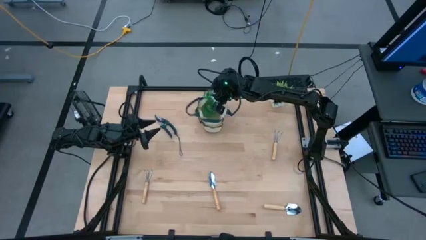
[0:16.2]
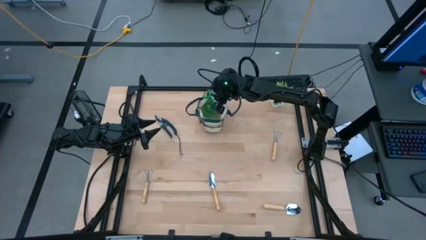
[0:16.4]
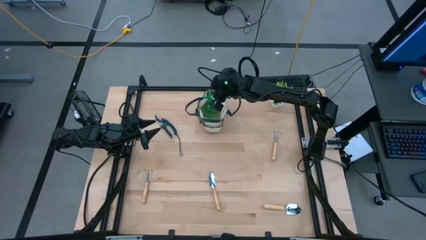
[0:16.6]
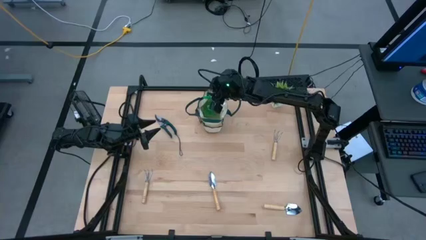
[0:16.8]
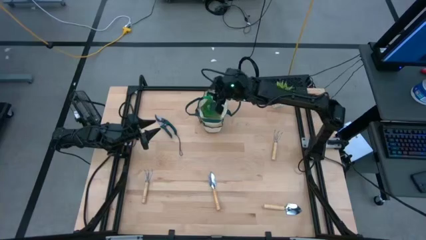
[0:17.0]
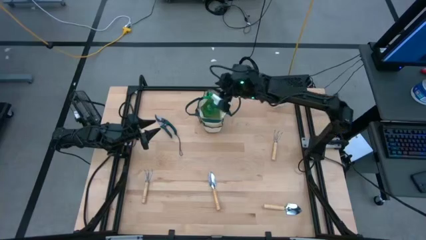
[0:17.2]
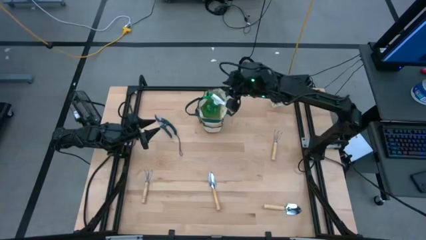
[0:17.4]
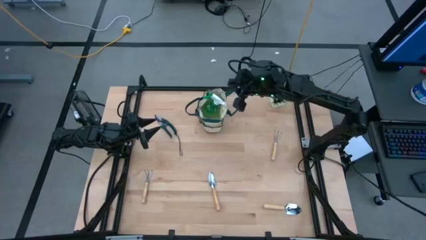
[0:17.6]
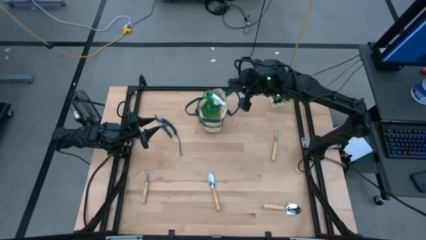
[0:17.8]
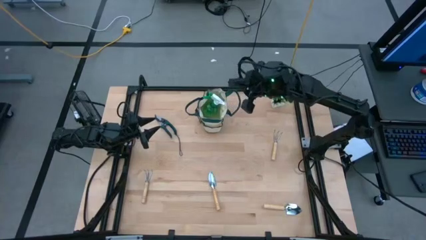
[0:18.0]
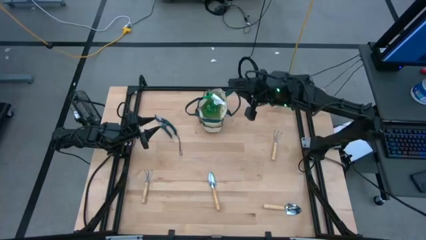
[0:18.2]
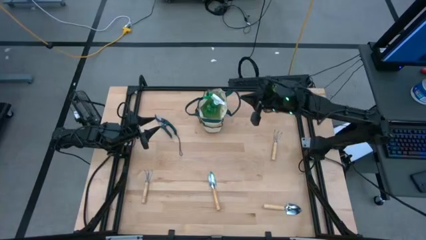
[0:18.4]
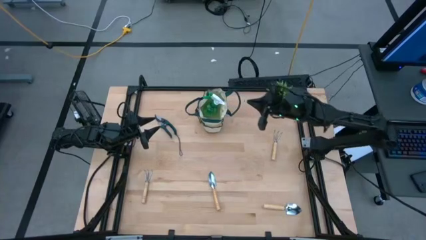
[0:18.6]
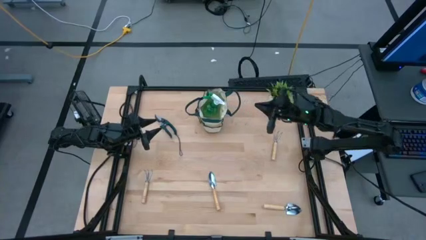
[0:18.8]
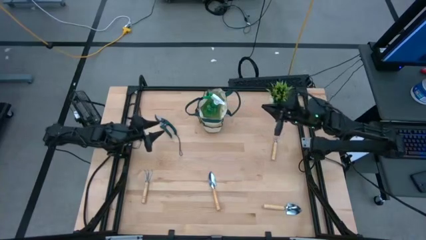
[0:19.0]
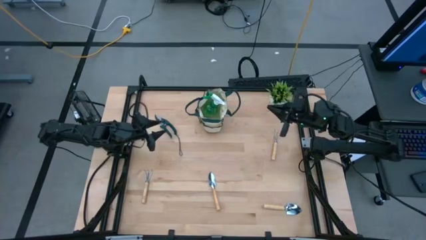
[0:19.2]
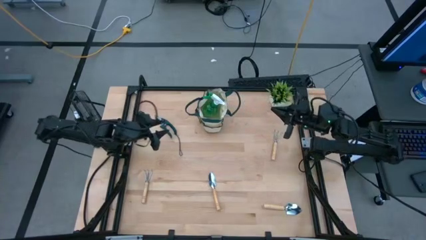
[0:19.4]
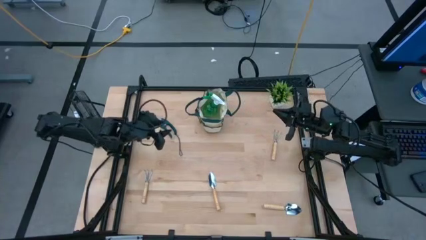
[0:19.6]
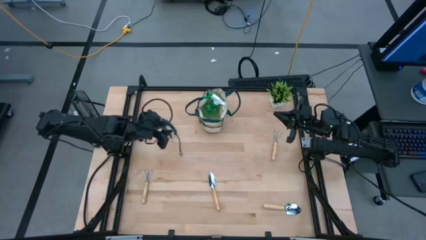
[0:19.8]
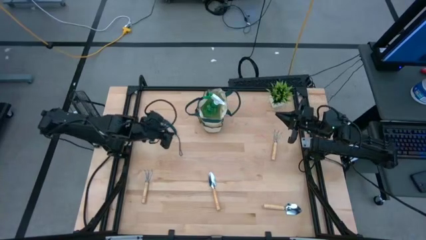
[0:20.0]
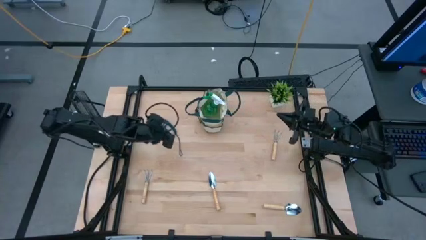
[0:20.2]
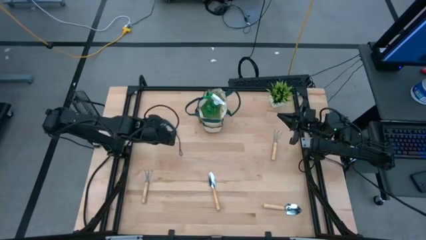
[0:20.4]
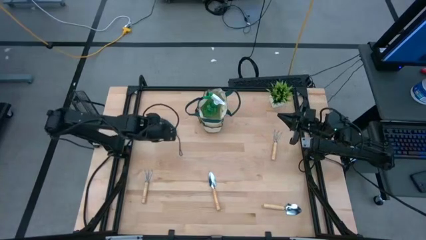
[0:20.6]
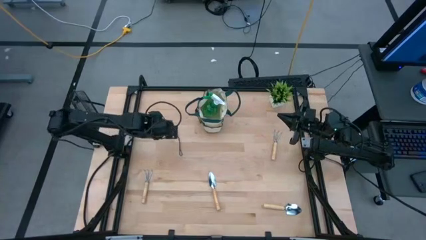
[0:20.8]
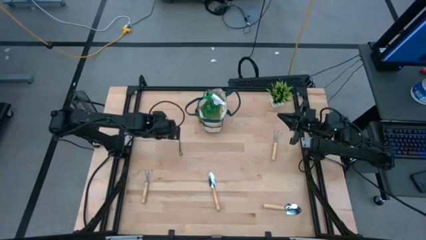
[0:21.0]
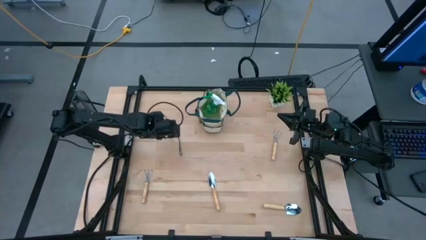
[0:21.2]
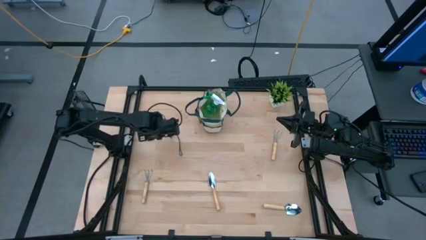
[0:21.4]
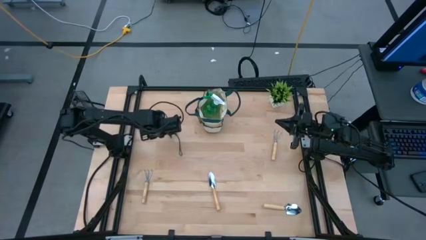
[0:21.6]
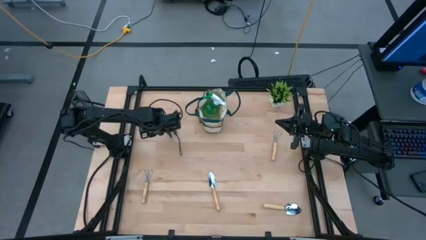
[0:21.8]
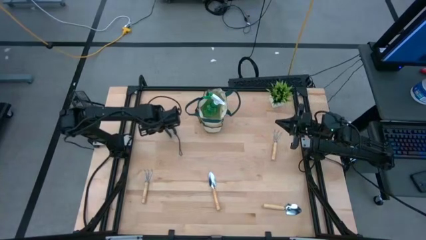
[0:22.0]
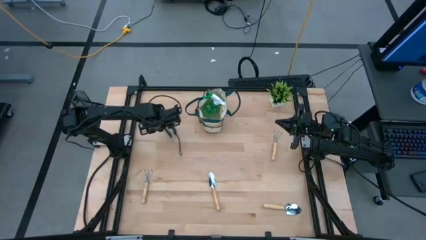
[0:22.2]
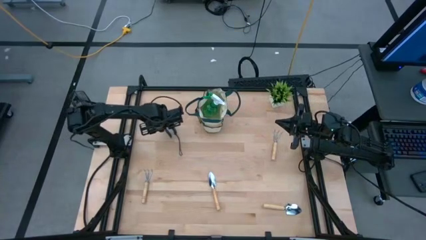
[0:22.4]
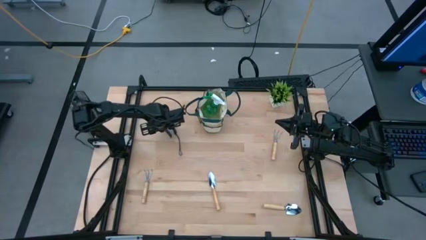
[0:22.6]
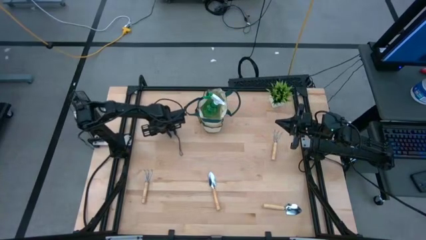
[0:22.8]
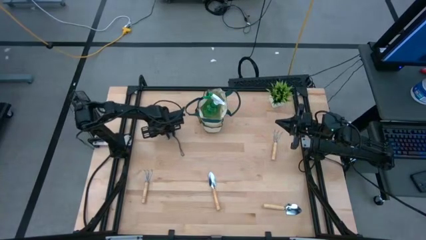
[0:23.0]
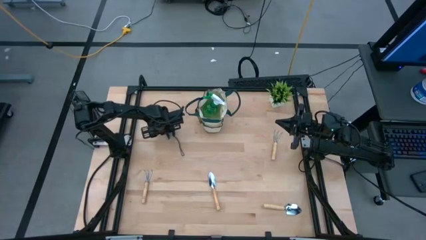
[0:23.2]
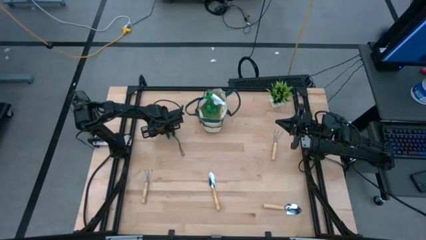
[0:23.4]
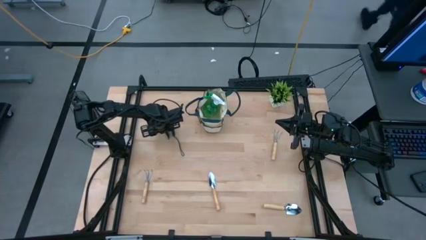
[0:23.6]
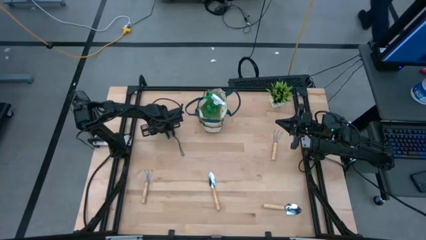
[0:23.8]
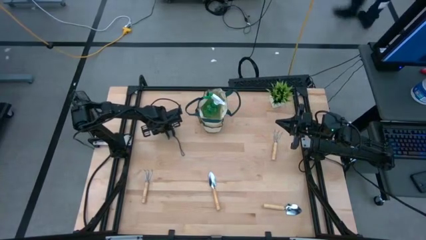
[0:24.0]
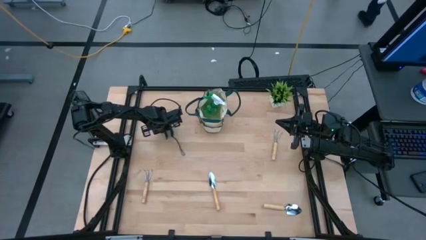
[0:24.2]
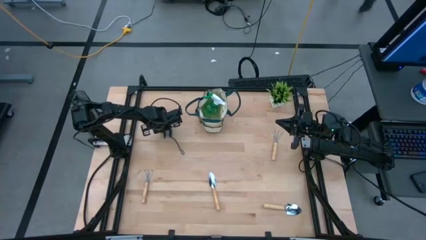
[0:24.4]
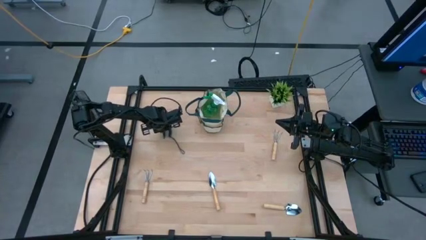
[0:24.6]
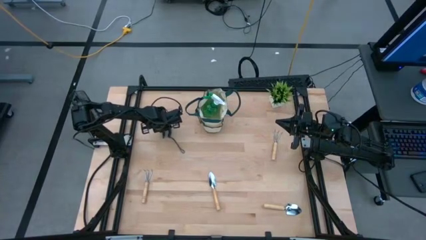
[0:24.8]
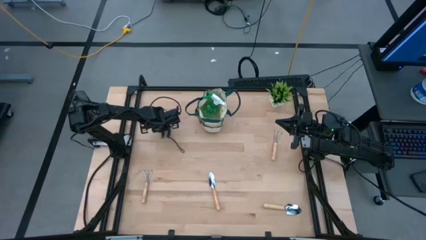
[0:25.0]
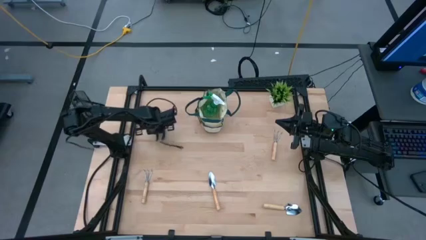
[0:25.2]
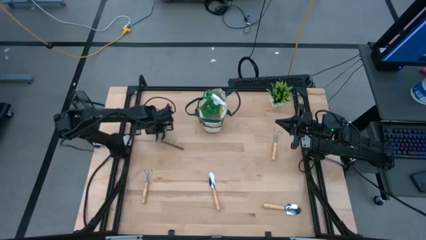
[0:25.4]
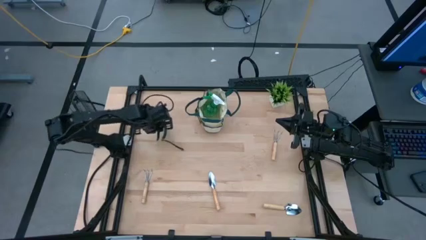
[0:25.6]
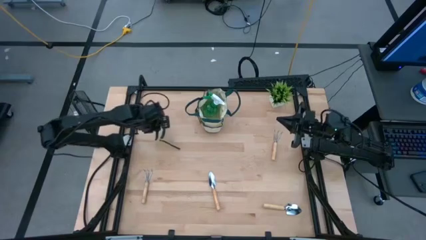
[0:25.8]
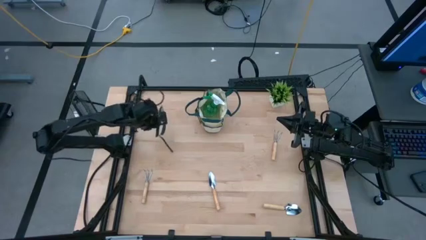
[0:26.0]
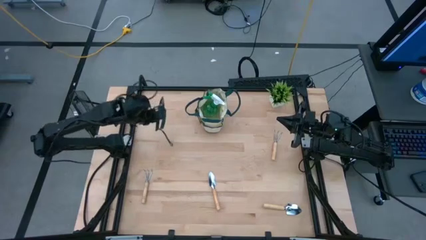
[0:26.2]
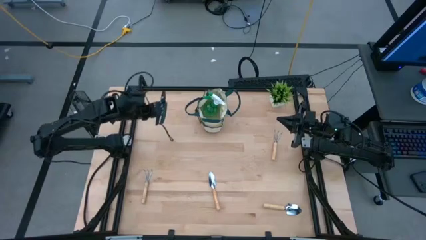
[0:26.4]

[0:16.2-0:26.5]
Task: Pick & Place Garden tools in Gardening bag
Put the green shear scissors into the gardening bag

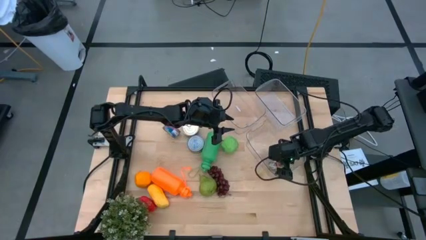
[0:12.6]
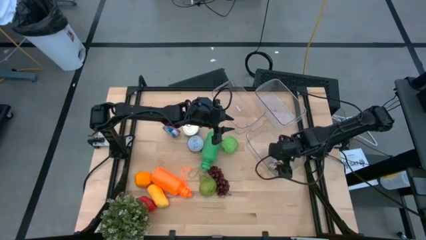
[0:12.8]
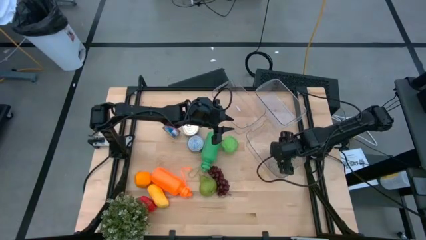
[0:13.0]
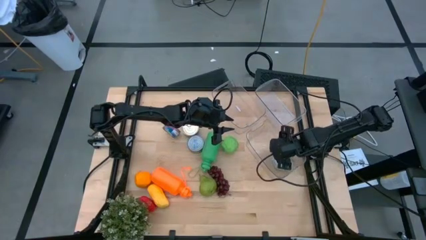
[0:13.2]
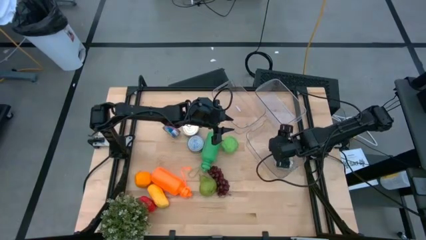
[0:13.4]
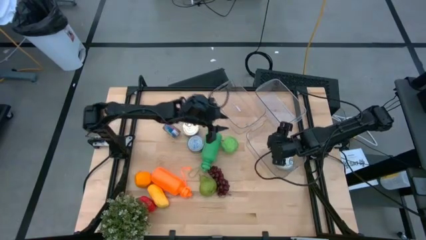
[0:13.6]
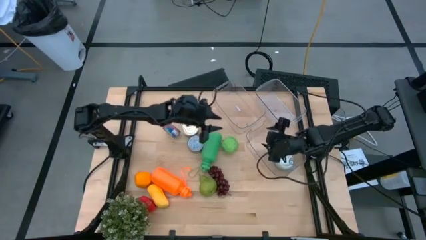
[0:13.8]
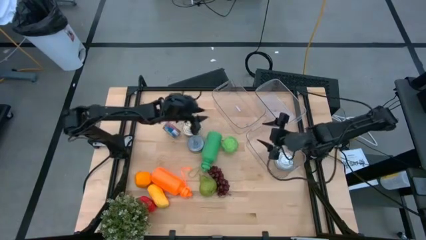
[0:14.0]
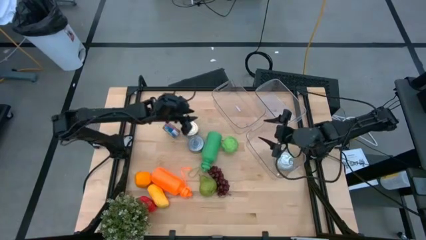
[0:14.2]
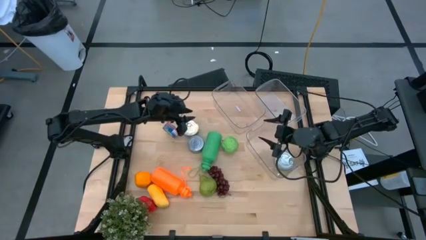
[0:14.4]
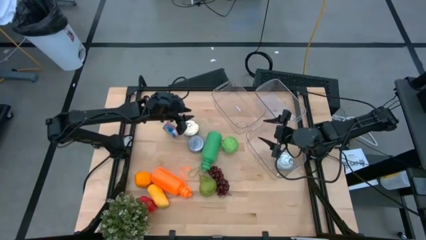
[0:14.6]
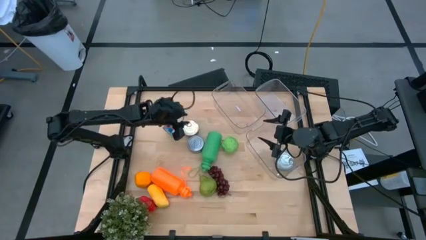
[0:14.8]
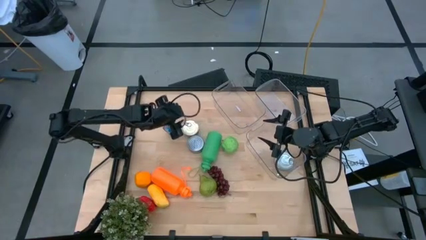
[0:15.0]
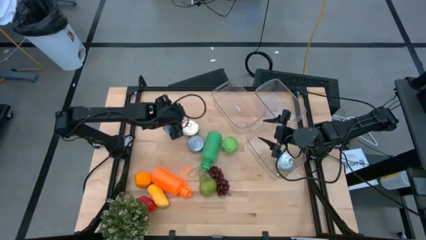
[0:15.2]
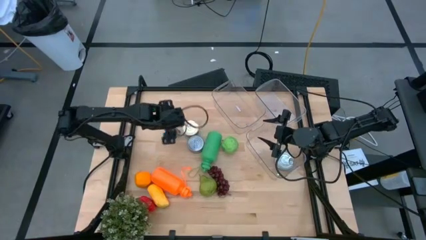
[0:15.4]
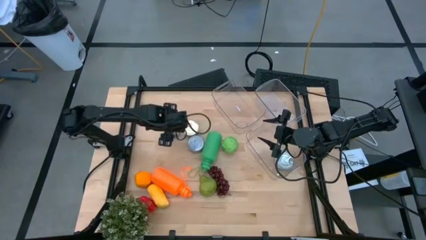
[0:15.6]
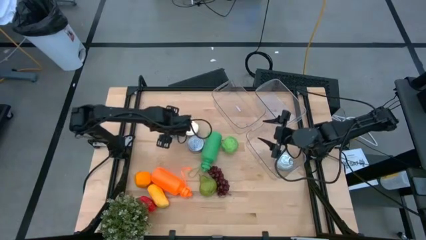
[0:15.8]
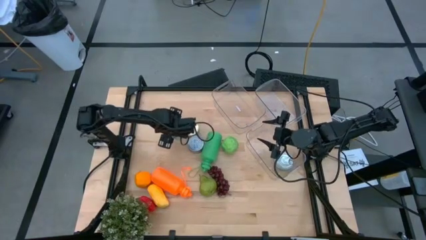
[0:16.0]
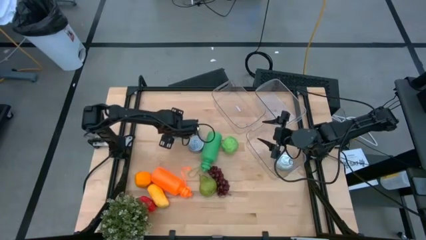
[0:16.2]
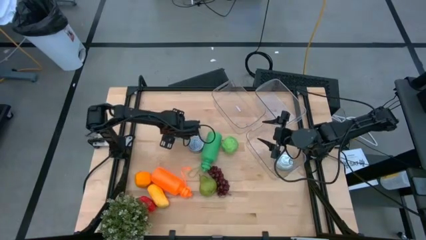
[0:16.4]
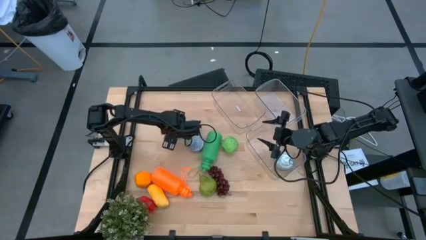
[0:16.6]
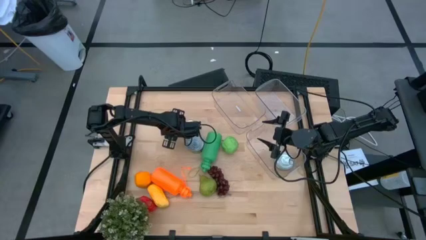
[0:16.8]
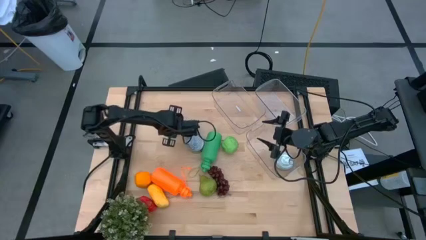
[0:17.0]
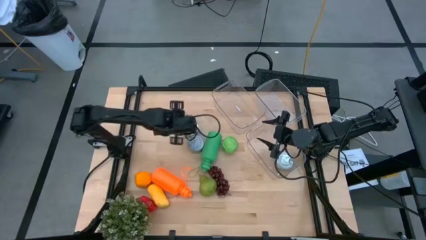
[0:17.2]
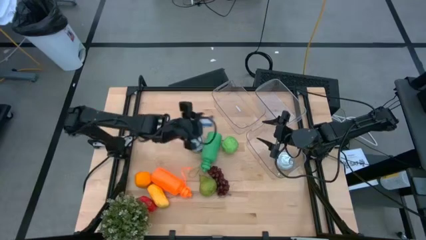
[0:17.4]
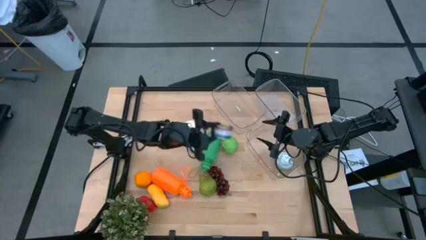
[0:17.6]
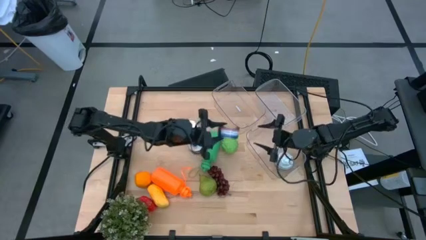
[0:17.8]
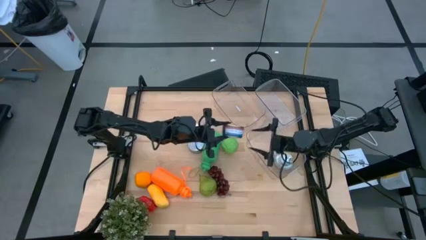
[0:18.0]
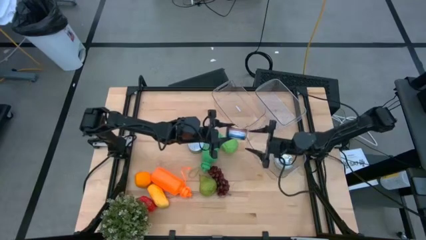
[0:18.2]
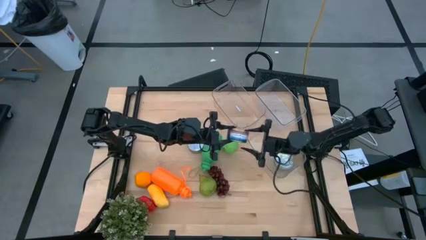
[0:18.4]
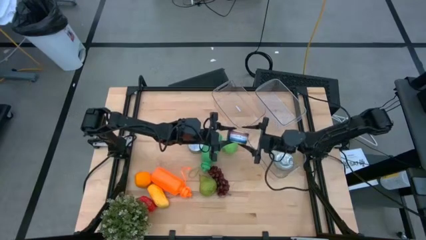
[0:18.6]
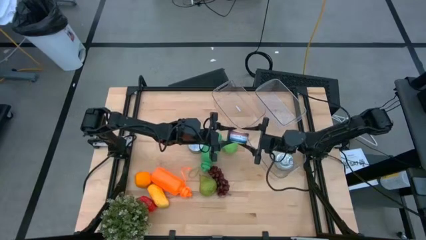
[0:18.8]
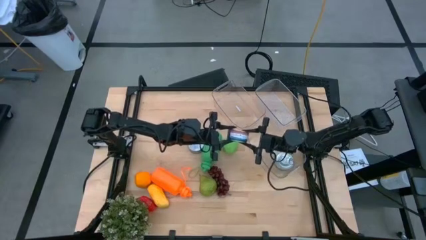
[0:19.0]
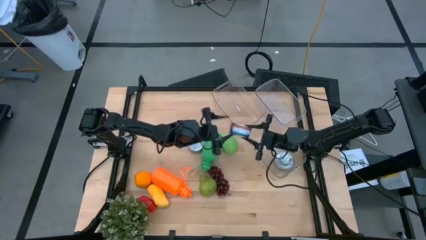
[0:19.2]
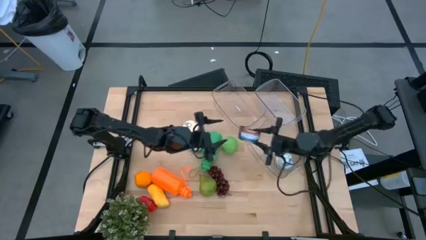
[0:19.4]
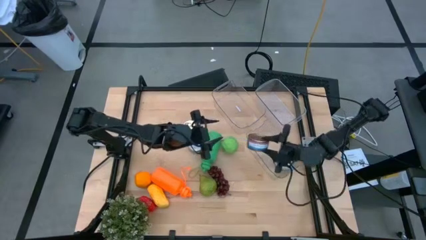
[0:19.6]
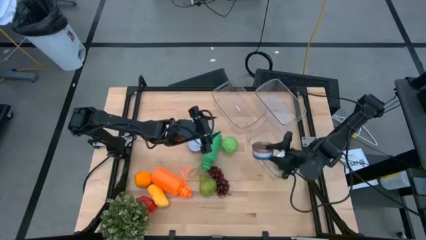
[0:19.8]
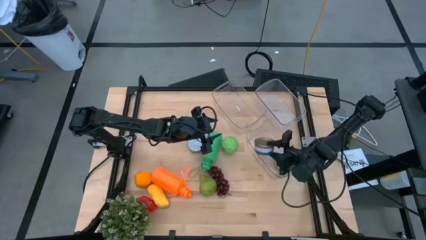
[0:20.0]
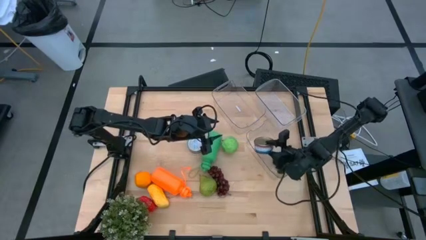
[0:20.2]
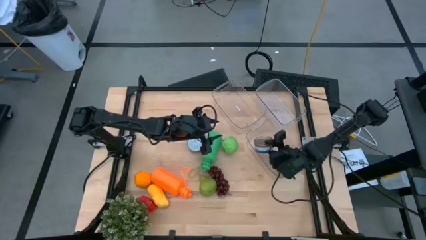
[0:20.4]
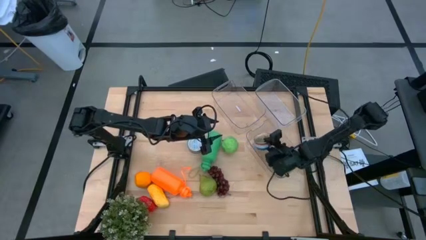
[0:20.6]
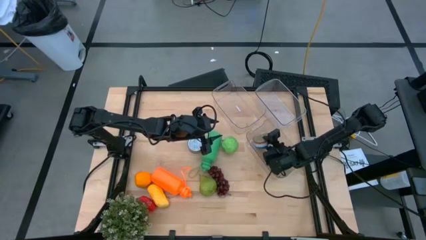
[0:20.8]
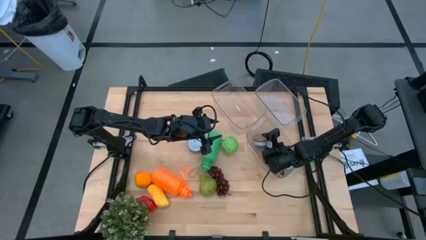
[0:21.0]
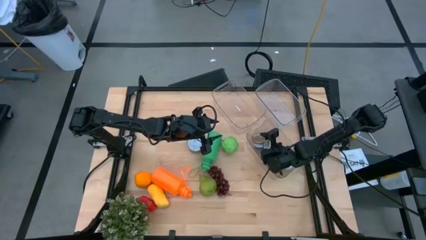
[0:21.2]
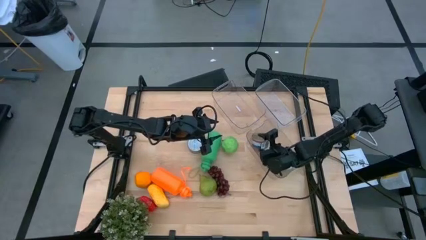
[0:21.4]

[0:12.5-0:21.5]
Task: Pick & Place Food Item
Put the left blue tuna can into the bottom transparent bin
